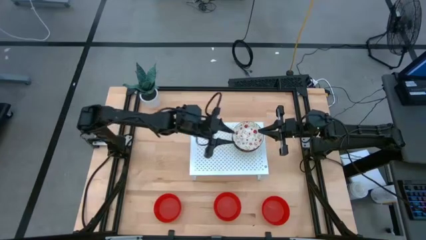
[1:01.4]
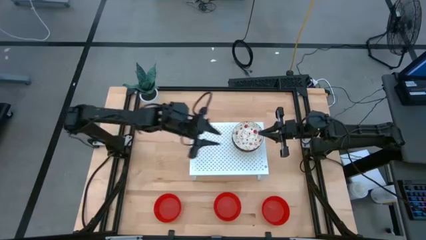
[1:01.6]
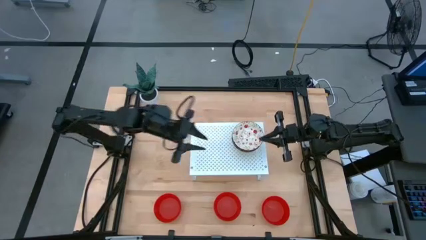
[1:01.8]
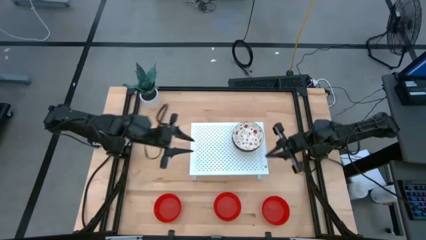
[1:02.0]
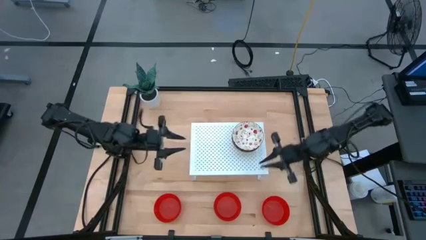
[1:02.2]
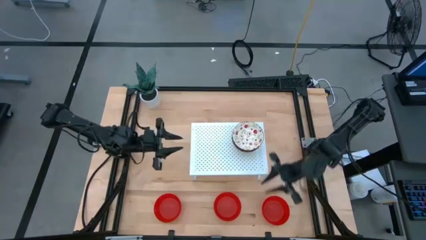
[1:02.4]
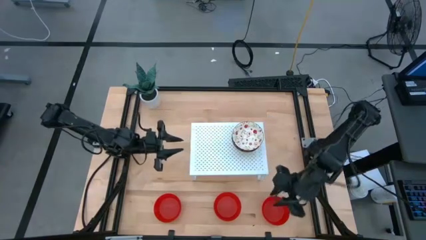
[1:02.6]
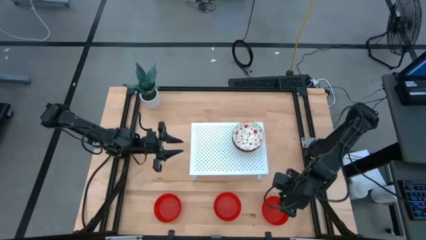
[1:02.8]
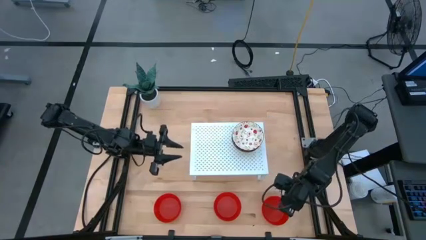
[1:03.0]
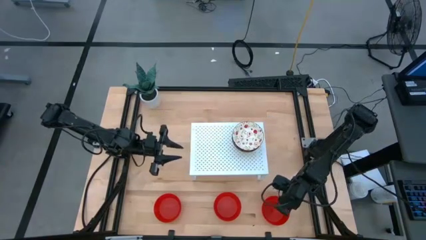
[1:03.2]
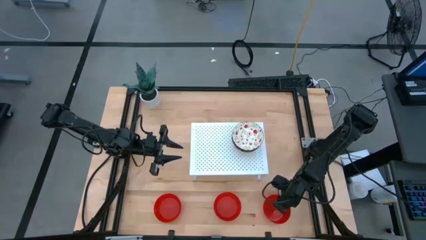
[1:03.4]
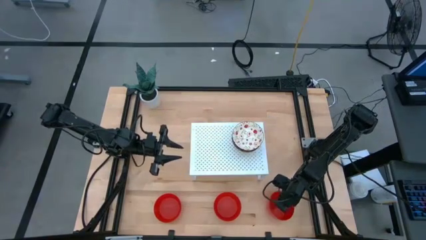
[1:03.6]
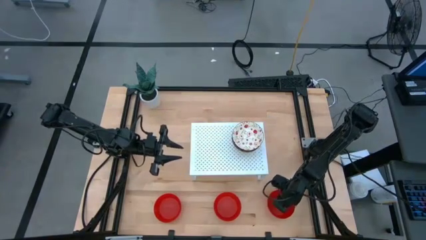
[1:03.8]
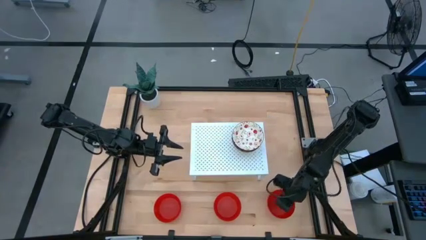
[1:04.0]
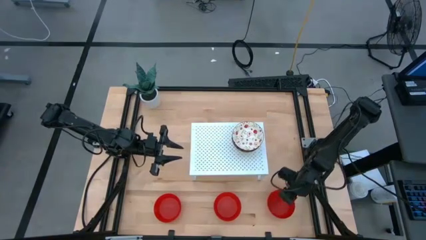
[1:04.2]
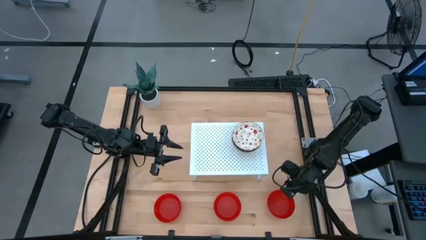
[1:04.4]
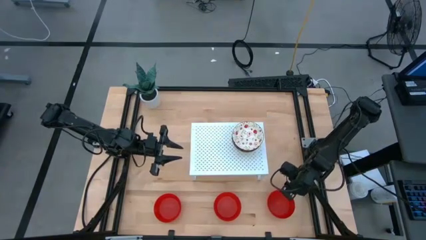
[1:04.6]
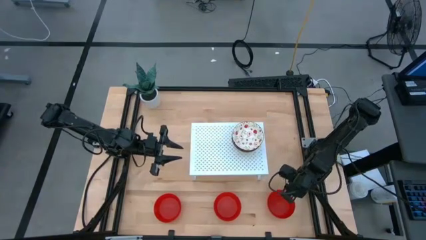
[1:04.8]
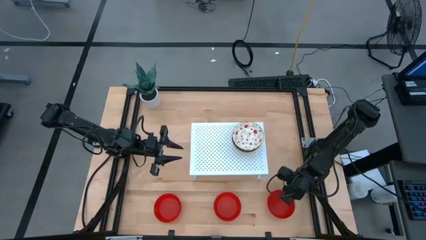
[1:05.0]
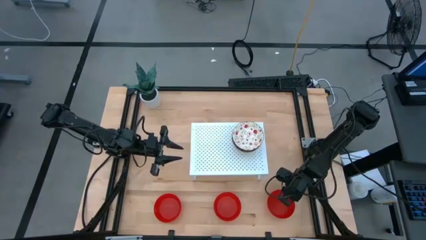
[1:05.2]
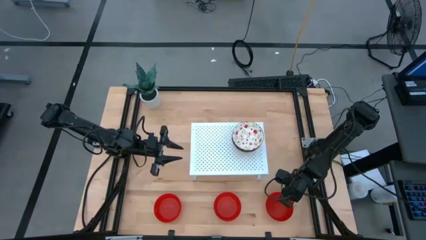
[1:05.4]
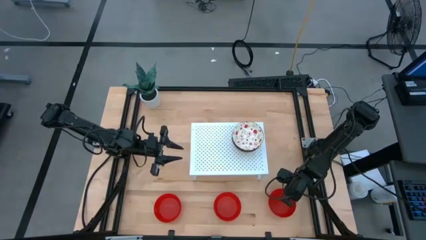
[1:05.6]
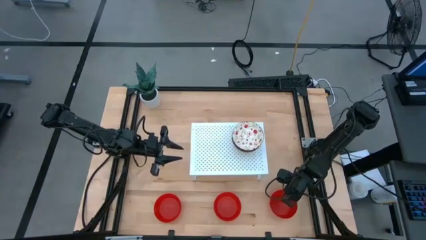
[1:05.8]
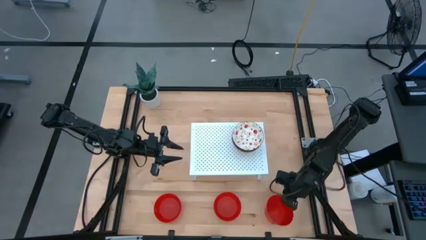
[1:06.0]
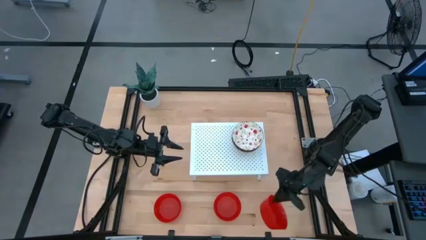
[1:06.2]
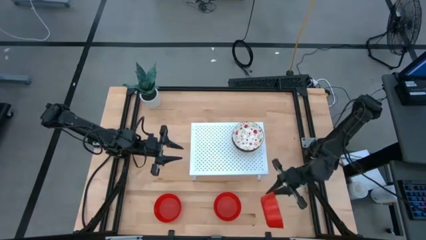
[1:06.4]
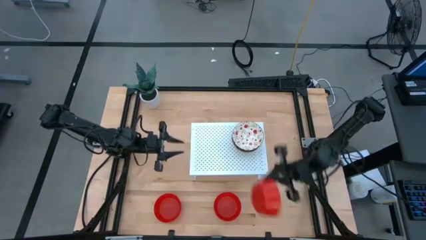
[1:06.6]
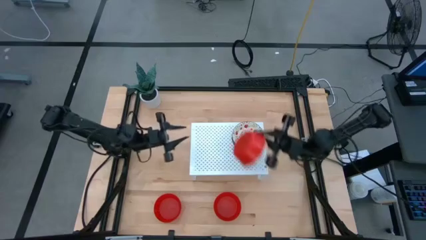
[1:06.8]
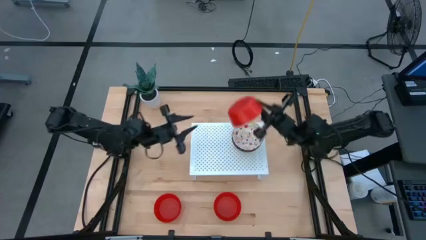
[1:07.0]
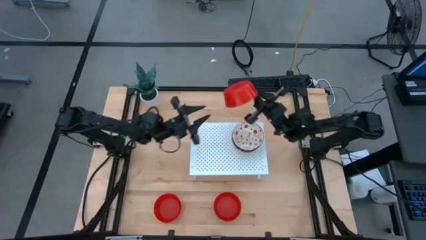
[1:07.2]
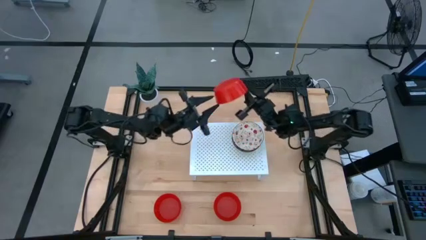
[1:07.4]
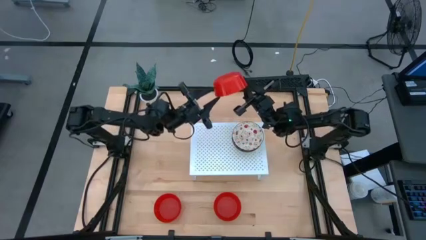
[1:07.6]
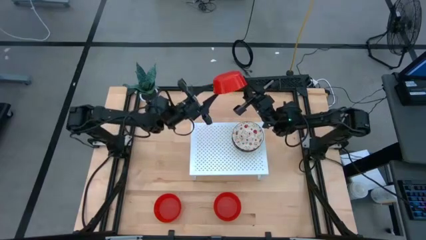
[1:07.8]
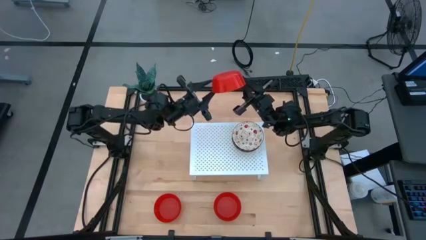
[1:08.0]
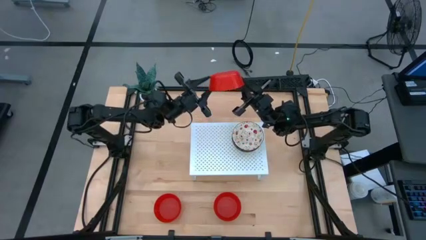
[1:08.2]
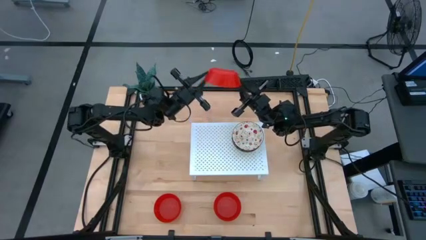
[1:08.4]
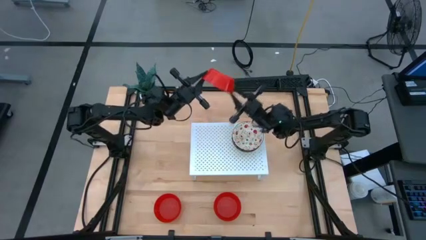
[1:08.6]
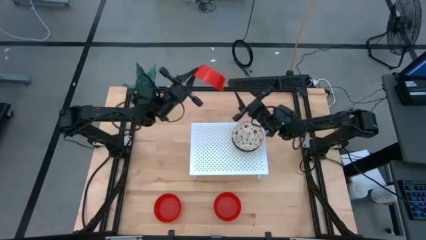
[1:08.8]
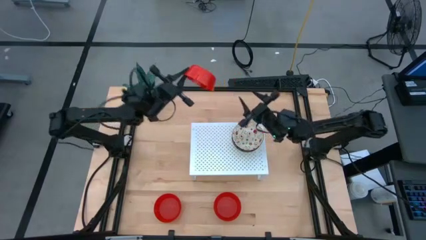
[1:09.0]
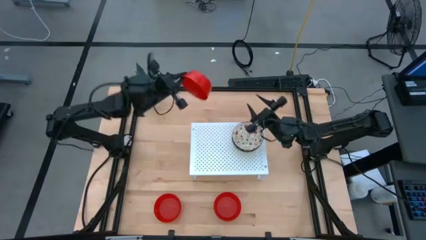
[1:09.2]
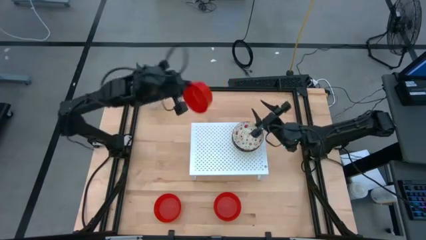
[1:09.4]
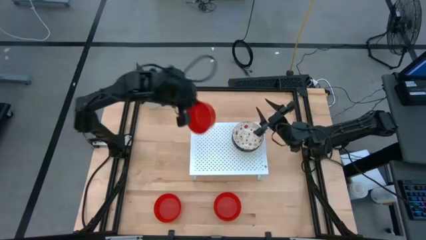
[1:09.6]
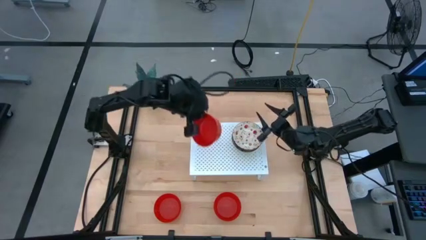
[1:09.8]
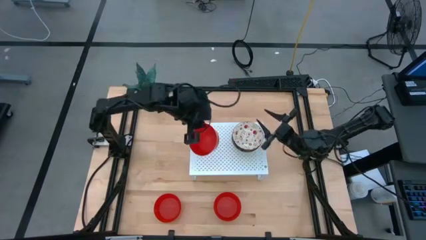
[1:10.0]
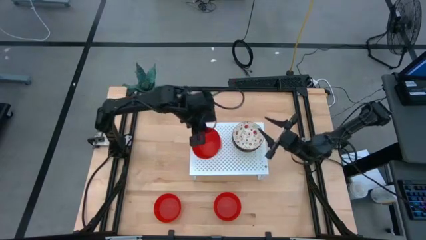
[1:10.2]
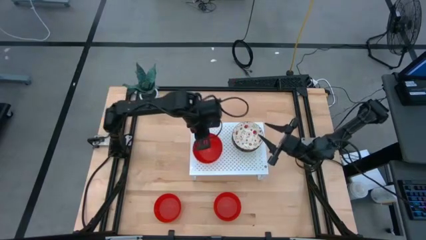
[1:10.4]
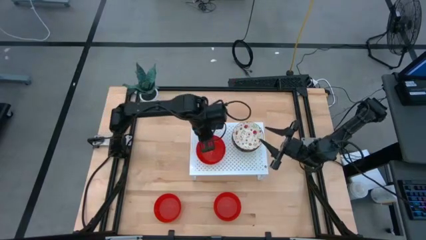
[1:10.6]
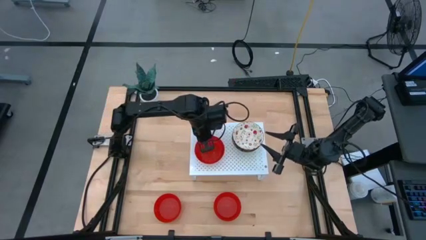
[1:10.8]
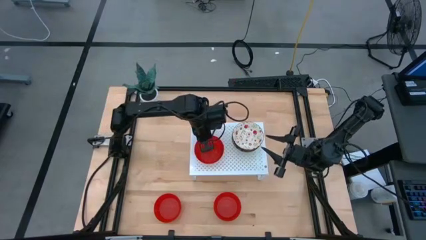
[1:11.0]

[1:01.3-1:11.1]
Task: Pick & Place Mini bowls
Put the right red bowl on the shelf

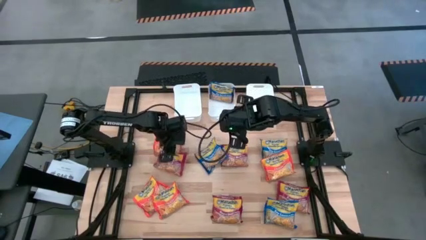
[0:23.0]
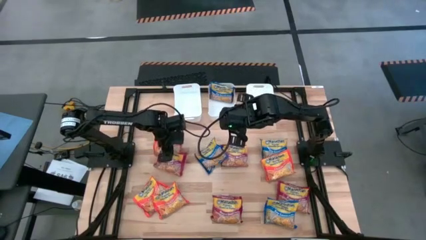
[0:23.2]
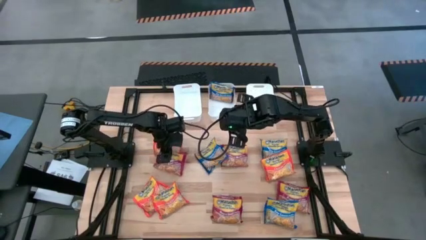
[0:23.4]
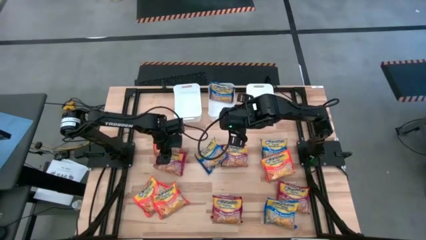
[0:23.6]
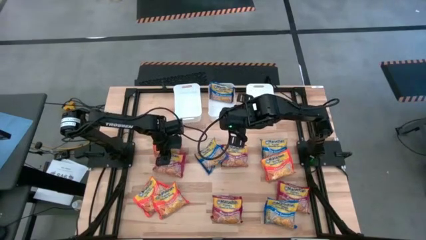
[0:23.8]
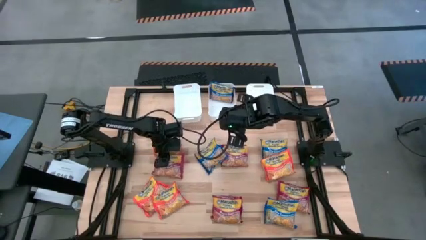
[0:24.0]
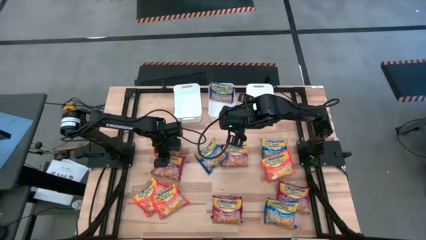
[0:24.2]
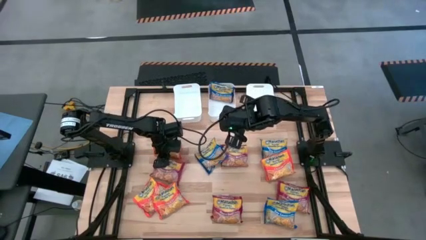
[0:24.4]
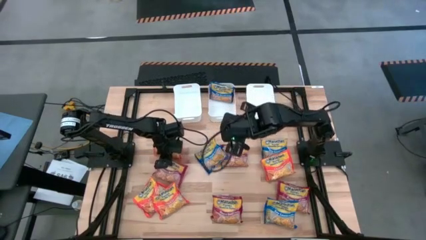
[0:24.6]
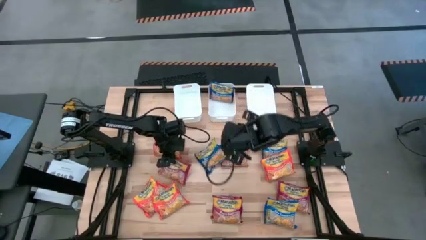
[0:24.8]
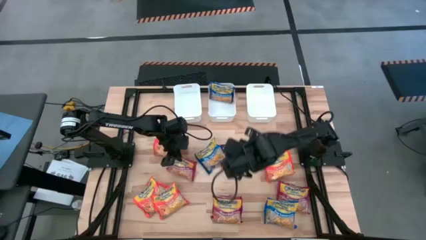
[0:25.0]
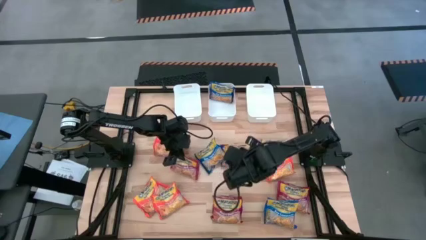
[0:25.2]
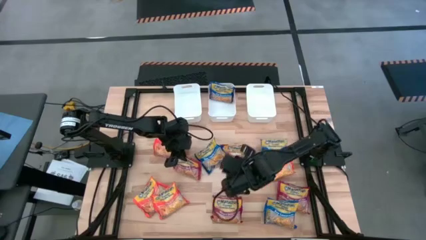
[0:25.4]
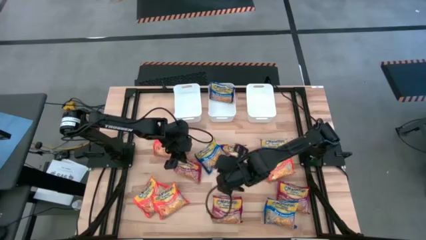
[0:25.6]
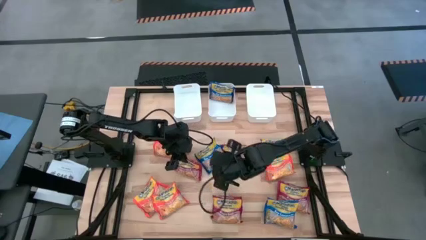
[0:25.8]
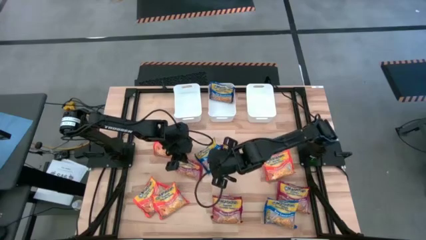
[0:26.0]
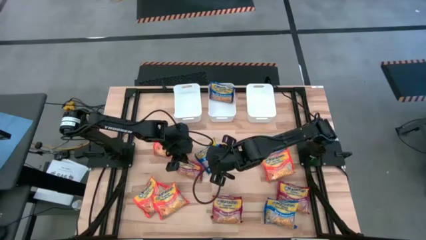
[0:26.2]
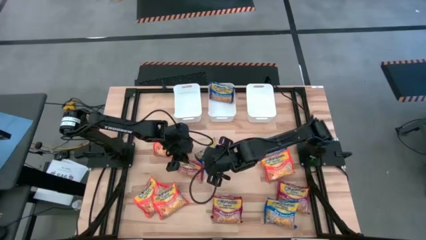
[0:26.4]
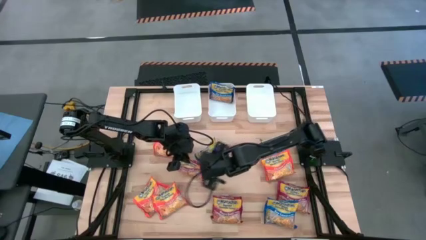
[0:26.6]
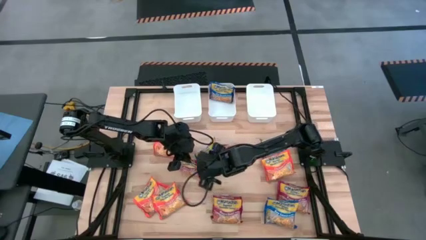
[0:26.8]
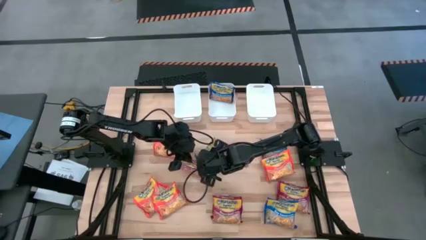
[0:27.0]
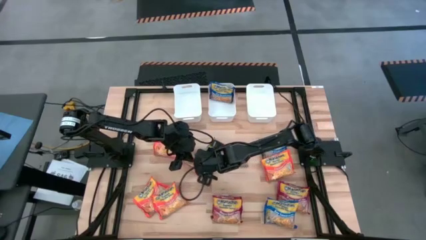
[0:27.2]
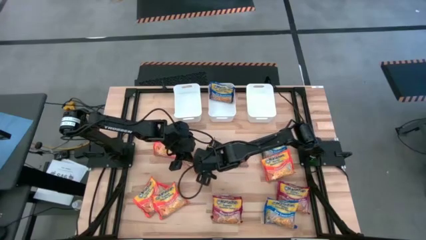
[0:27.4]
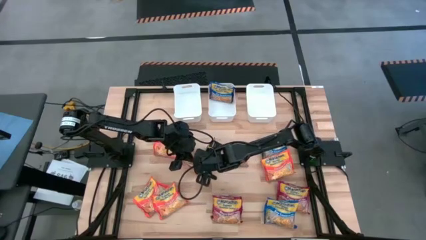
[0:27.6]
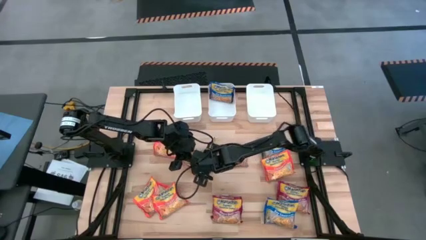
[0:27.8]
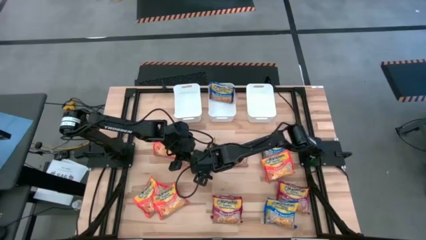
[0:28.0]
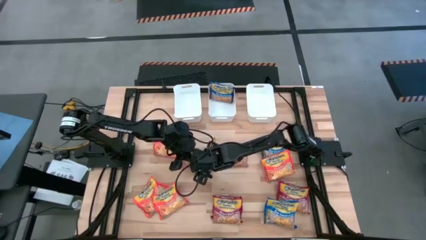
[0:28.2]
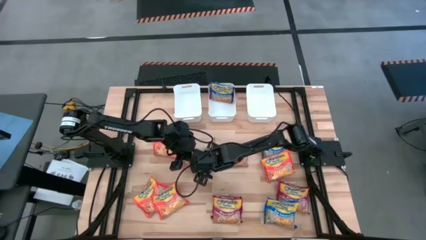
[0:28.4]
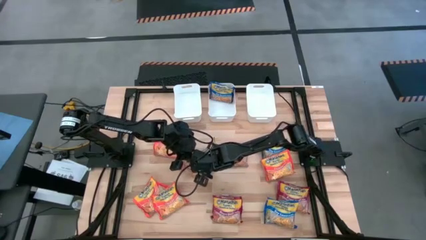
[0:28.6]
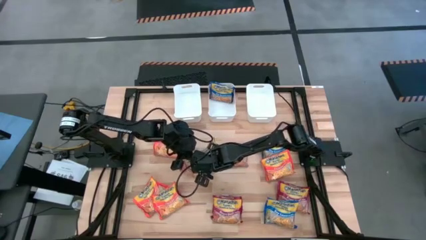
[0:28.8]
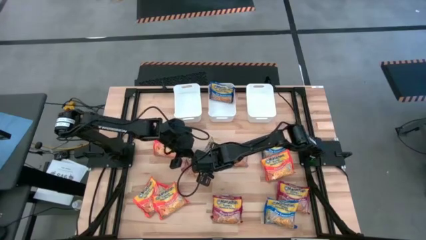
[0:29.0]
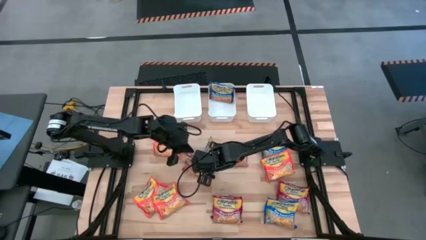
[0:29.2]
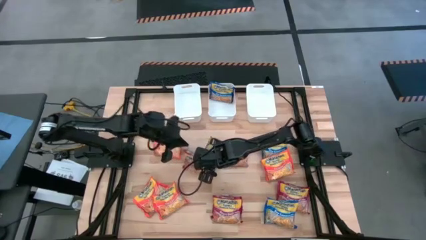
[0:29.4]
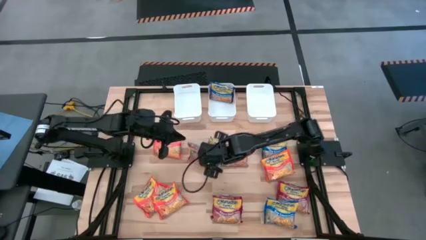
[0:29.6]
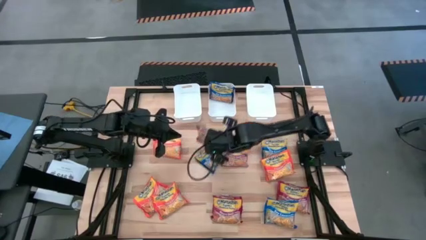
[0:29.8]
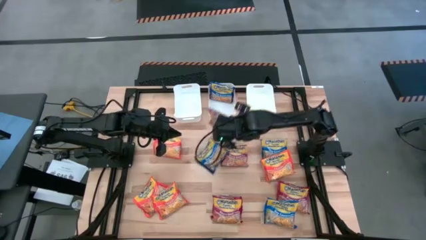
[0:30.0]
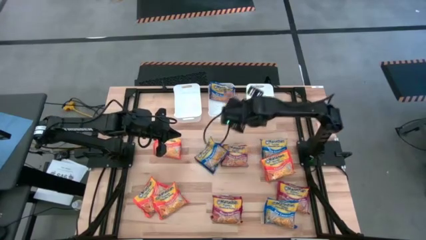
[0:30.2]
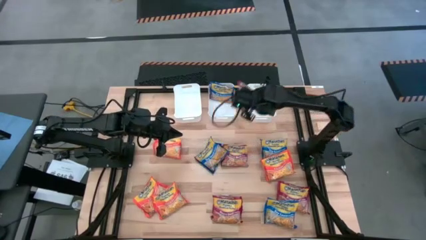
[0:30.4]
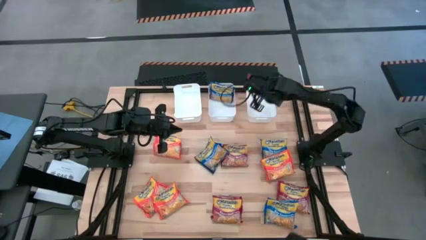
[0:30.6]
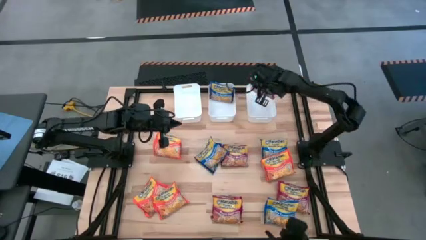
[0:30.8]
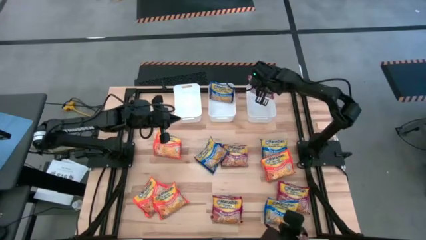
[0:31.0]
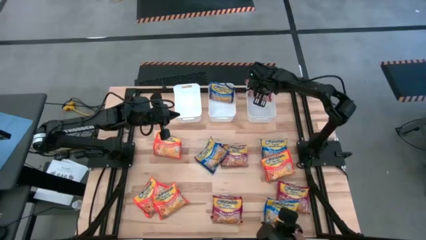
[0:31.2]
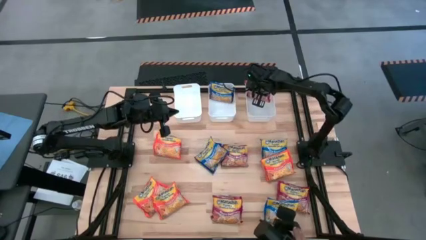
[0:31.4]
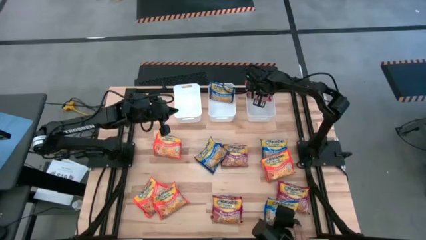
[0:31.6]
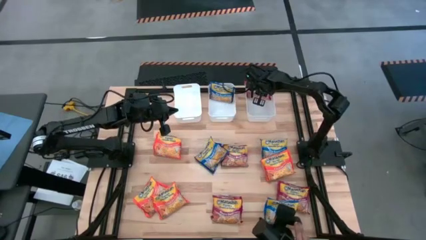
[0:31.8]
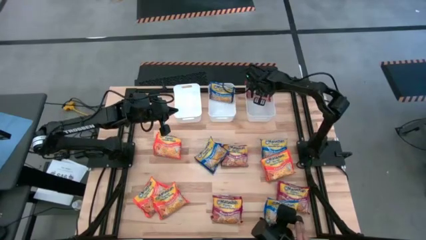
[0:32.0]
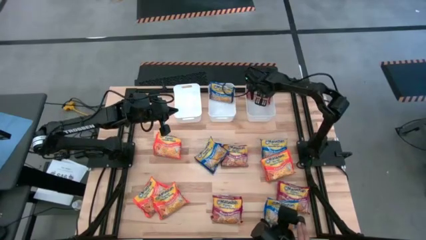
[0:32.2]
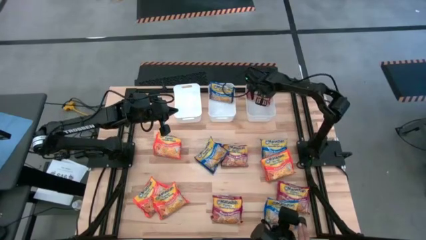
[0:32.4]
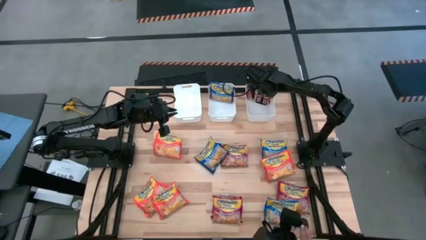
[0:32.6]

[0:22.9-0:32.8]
Task: Sort Maruchan noodles
Put the red noodle pack into the right white bin
